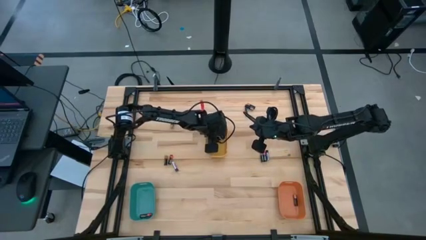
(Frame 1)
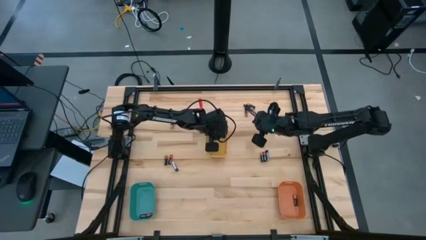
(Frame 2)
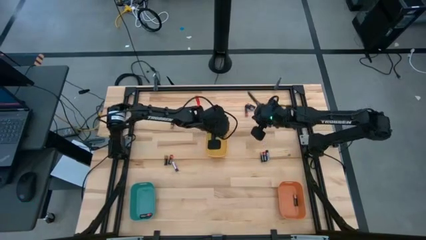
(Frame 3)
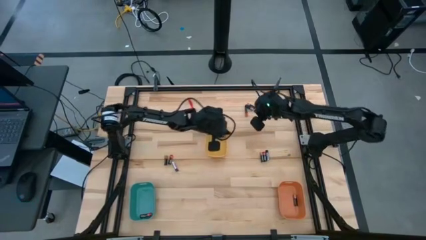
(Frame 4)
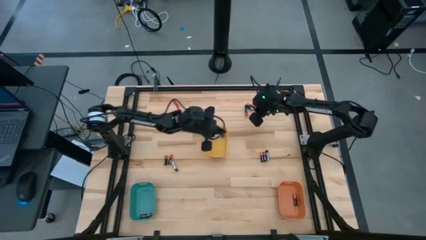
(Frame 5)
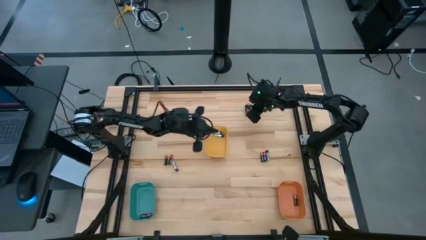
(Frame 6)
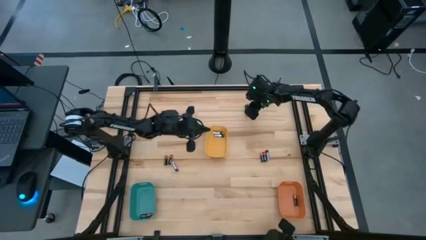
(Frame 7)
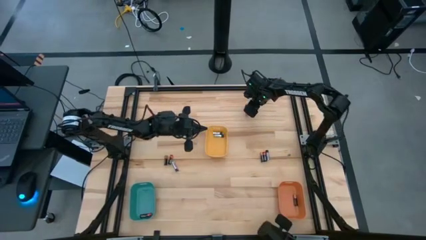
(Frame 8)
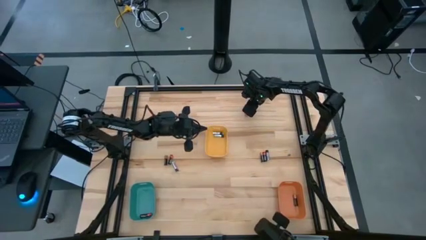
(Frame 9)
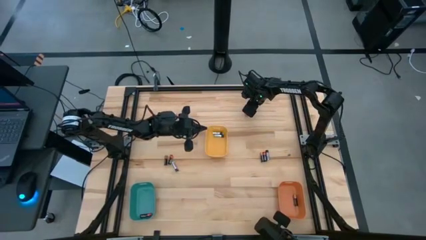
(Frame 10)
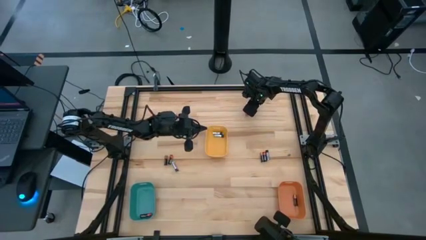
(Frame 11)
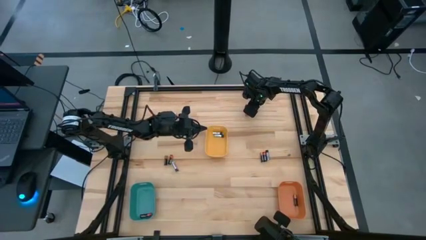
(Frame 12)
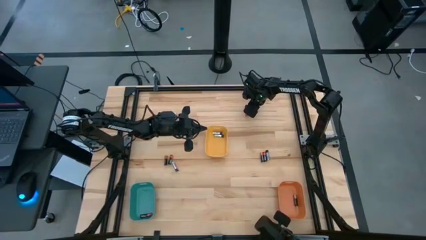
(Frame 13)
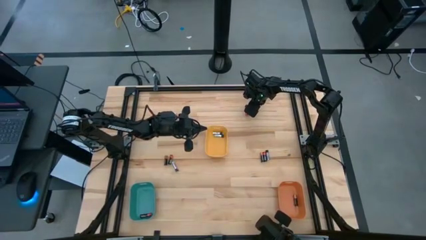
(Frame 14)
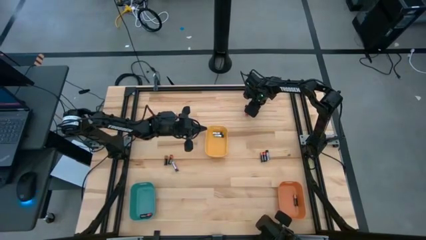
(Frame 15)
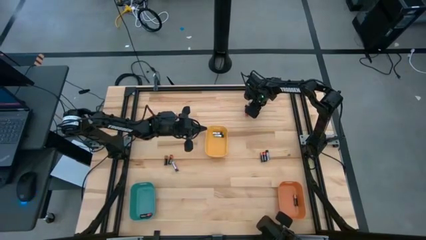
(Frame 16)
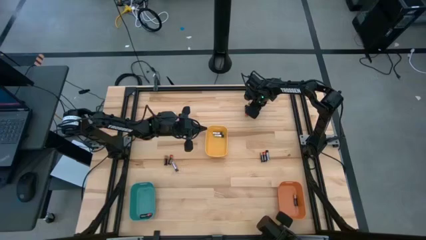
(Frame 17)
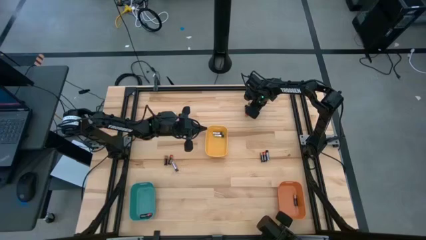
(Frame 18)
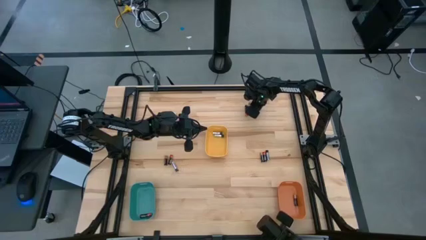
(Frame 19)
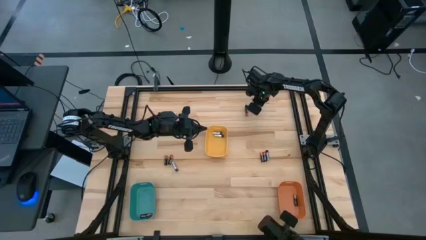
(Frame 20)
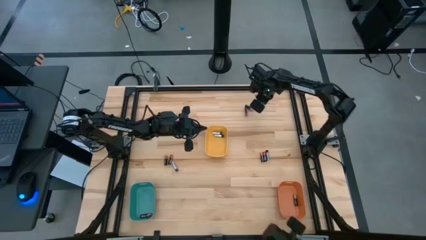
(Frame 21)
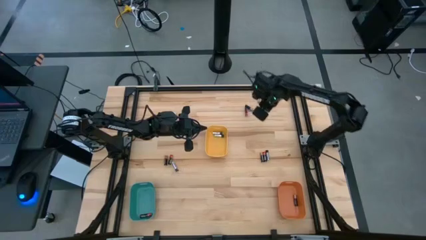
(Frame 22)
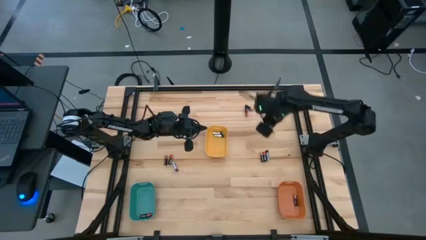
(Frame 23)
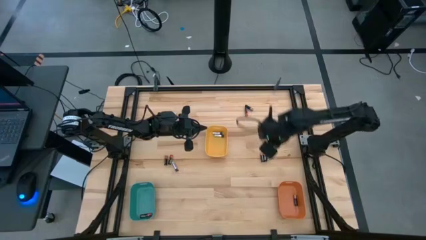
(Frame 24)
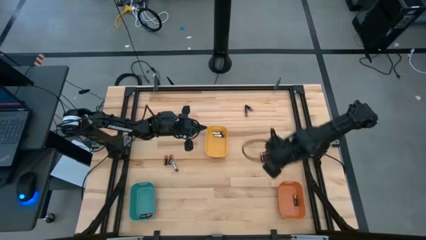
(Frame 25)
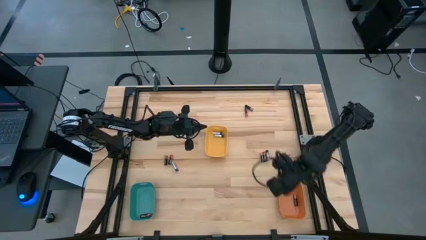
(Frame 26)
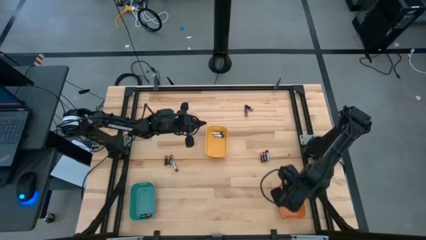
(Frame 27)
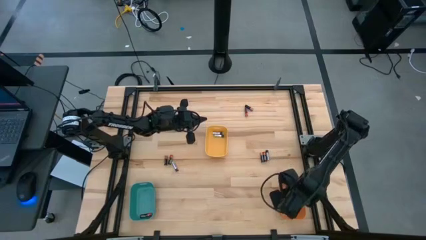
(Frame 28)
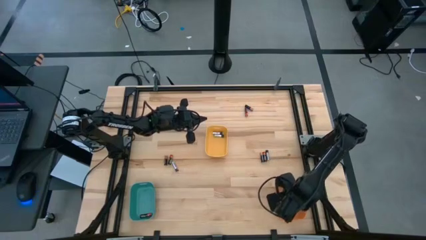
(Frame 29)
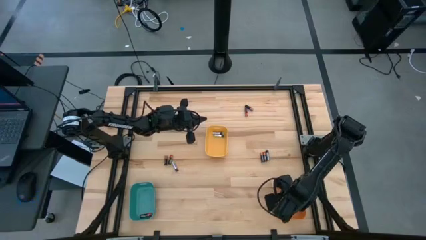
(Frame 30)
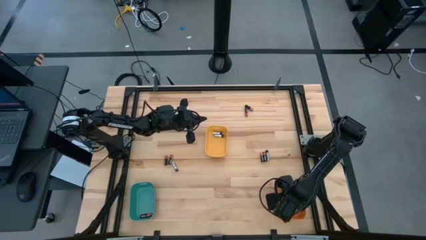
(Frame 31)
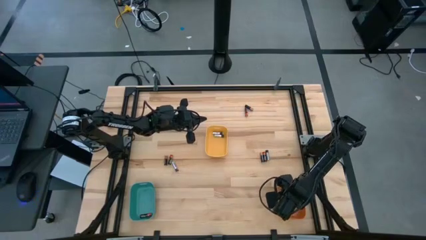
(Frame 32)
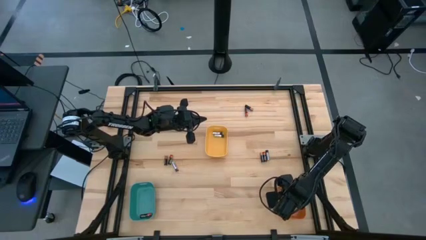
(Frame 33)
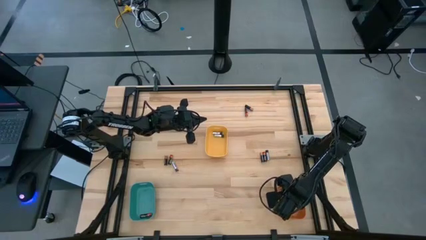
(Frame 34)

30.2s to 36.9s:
Task: Sort batteries
Put the brown battery into the orange bin

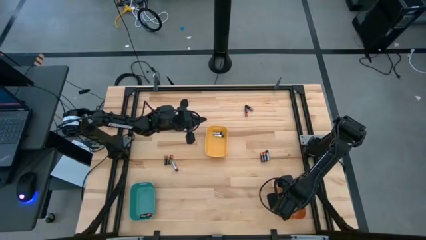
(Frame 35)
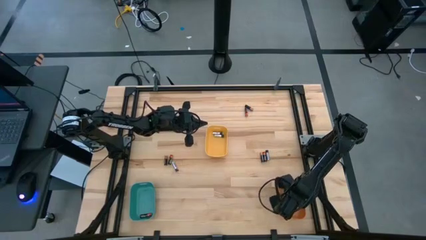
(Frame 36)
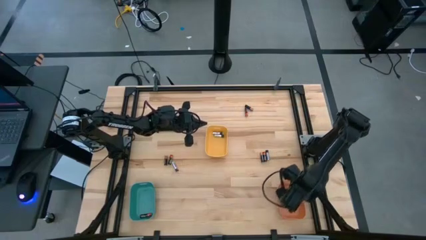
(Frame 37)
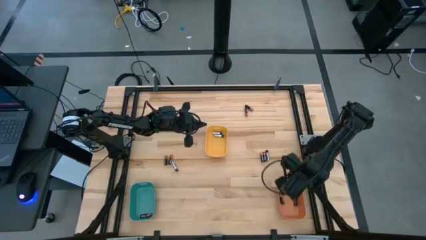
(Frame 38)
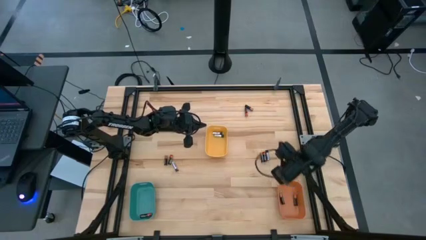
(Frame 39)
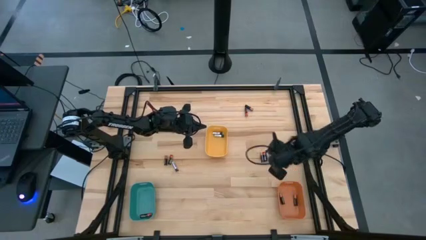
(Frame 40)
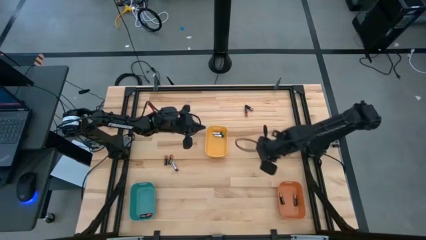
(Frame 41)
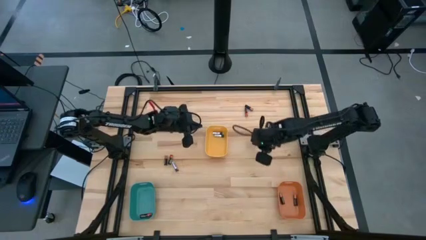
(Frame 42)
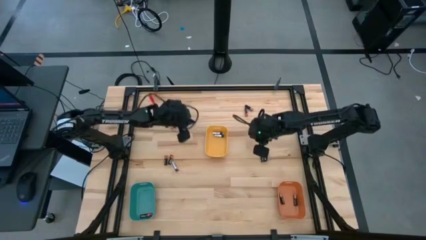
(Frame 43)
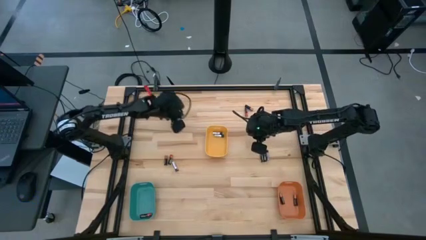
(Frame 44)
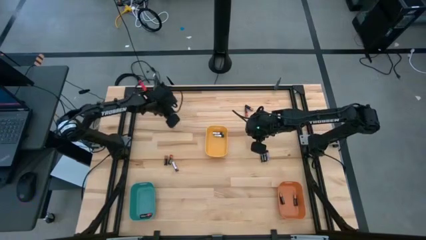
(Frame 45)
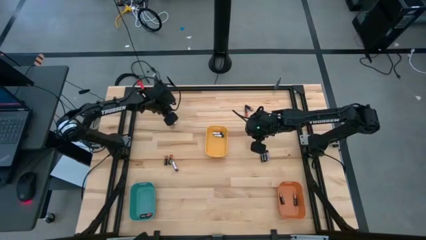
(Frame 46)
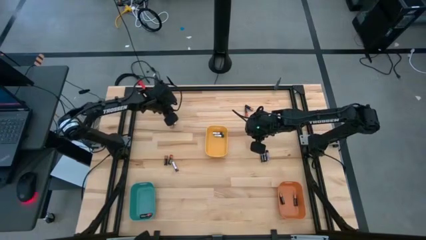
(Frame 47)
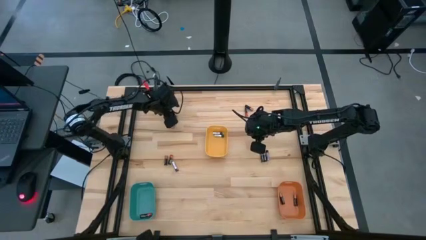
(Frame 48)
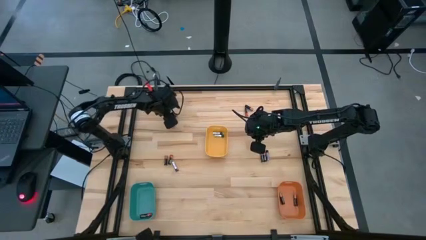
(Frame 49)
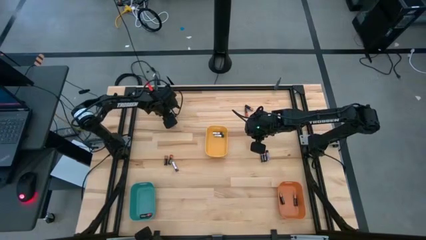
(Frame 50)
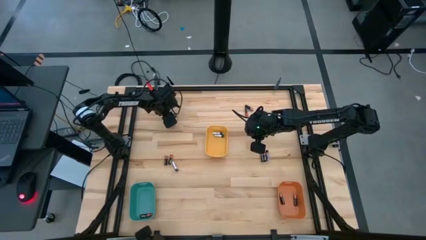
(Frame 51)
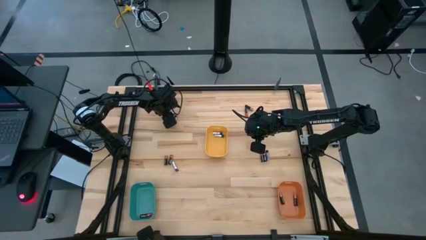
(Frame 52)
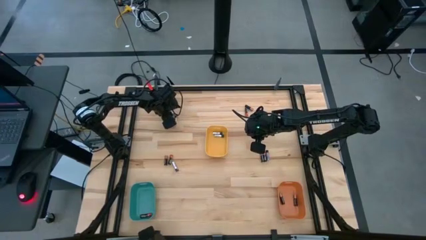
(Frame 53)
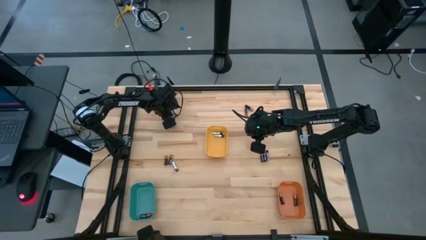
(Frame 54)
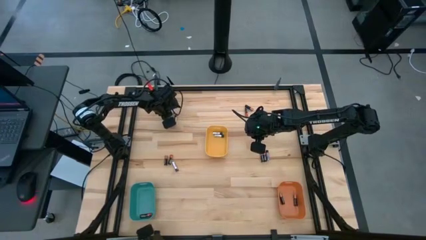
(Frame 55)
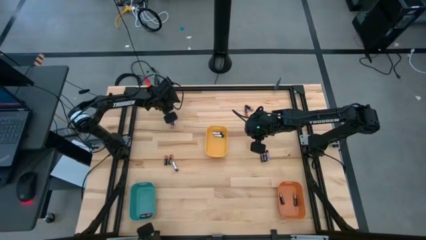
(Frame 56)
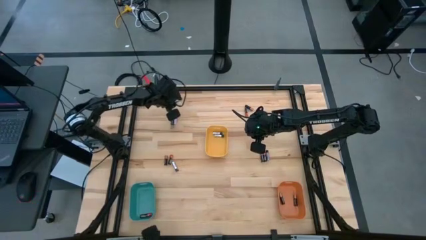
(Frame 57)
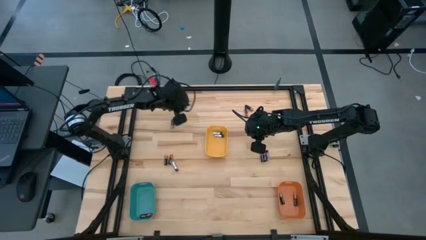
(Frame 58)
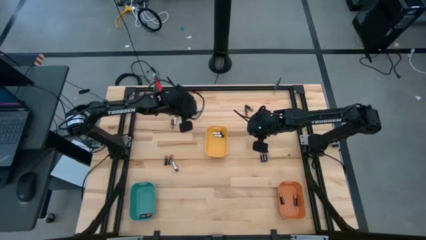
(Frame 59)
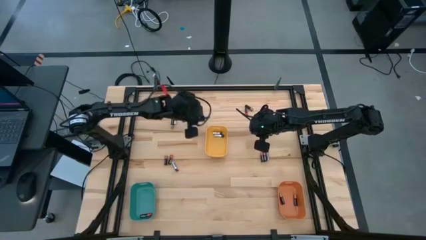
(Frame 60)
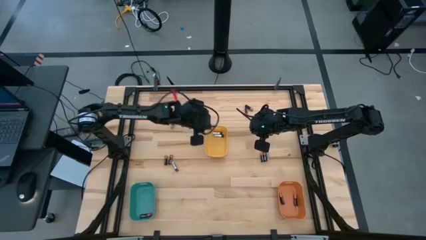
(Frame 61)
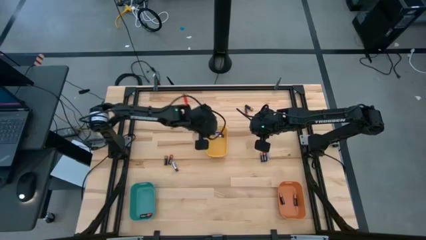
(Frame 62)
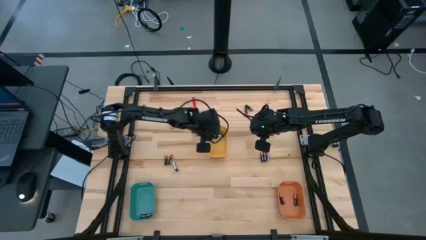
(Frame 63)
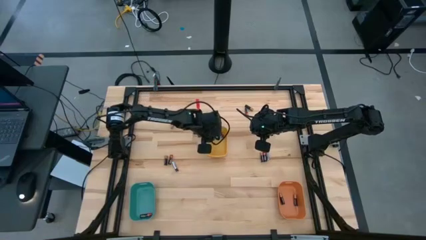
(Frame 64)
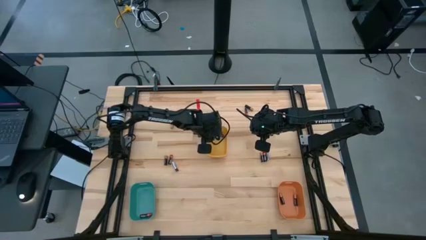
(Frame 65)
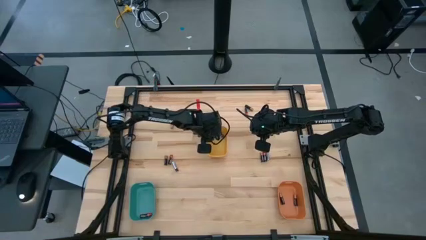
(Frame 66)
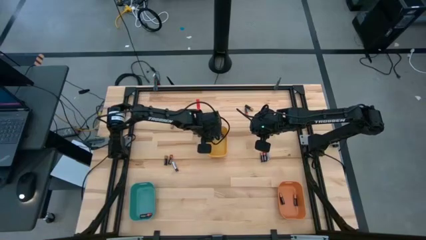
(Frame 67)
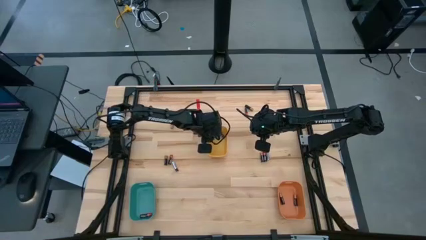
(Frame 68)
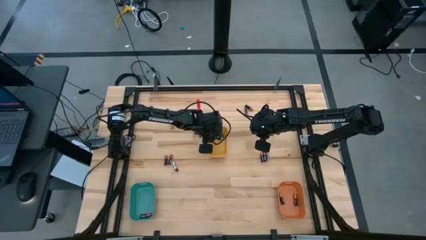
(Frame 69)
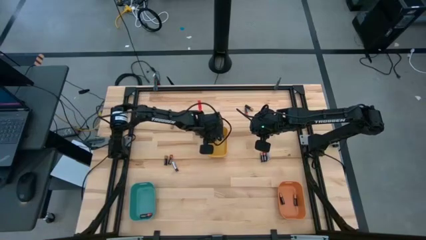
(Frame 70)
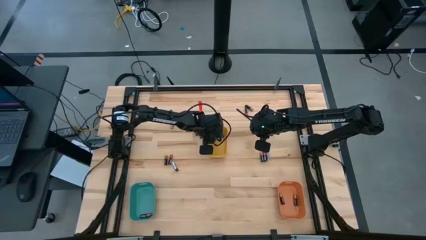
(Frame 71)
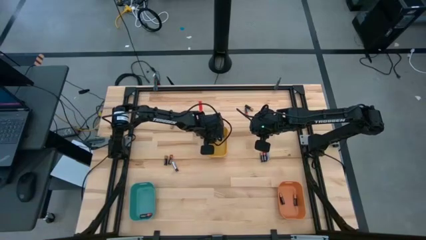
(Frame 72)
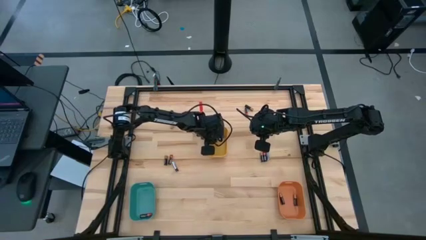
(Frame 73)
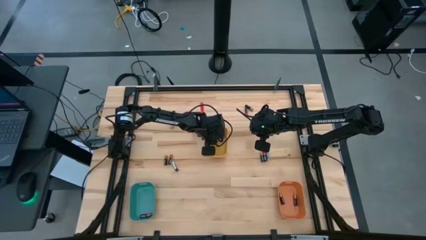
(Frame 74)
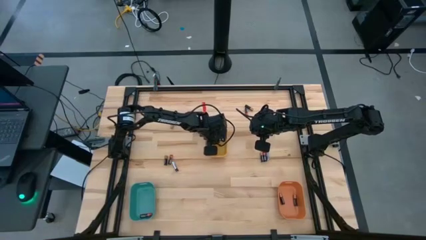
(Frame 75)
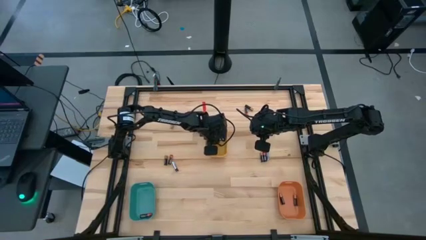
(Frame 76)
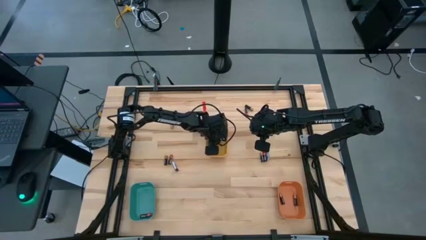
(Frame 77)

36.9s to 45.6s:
Put the silver battery into the yellow bin
